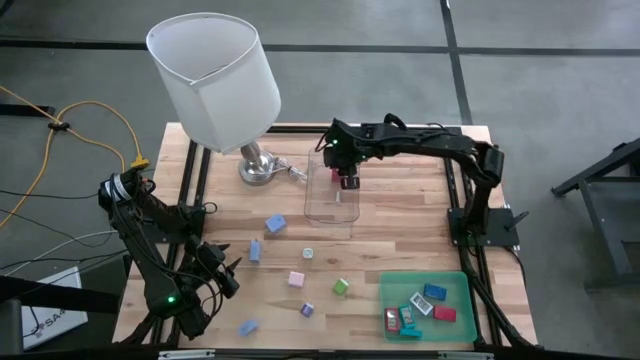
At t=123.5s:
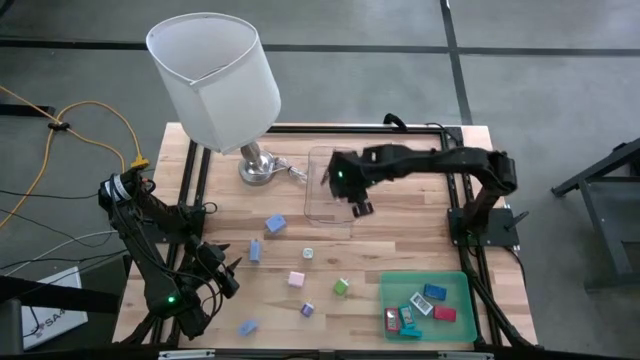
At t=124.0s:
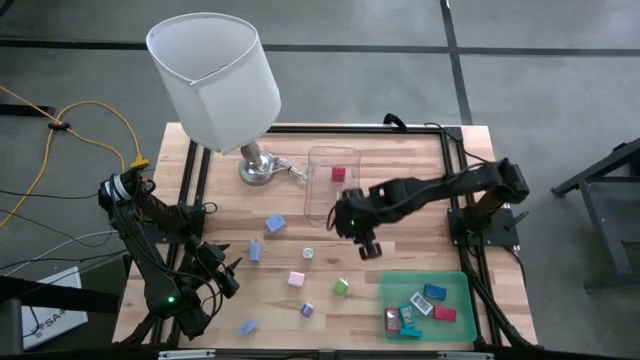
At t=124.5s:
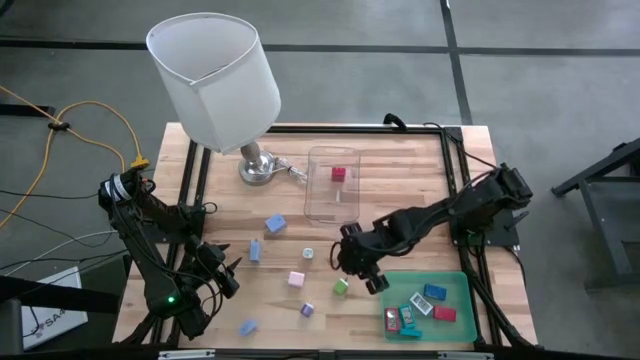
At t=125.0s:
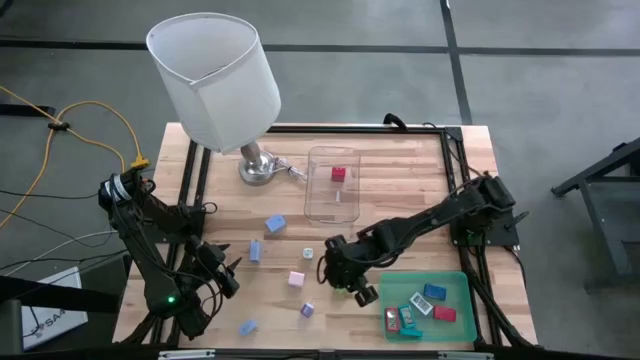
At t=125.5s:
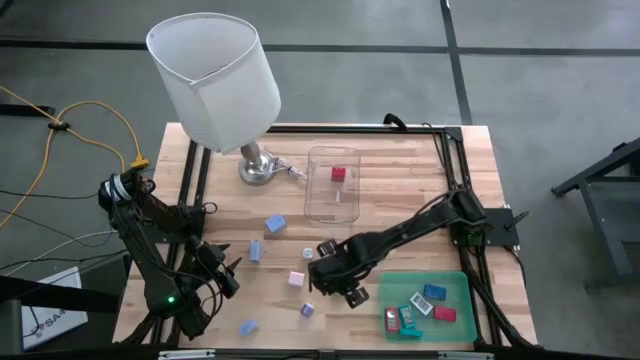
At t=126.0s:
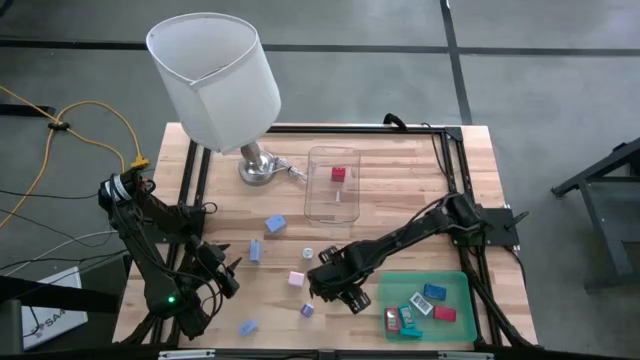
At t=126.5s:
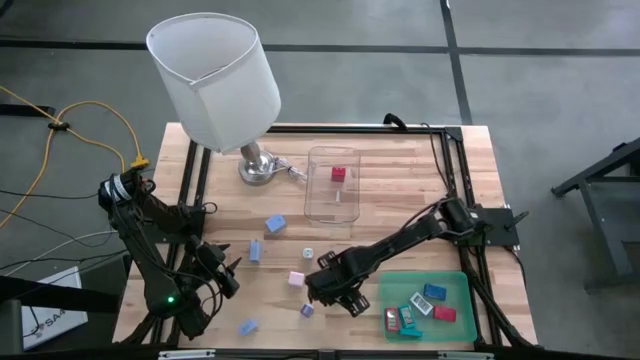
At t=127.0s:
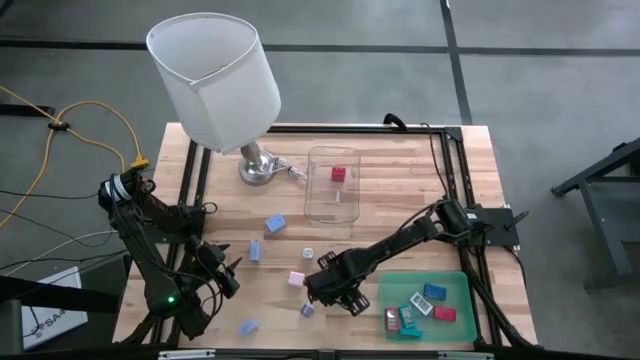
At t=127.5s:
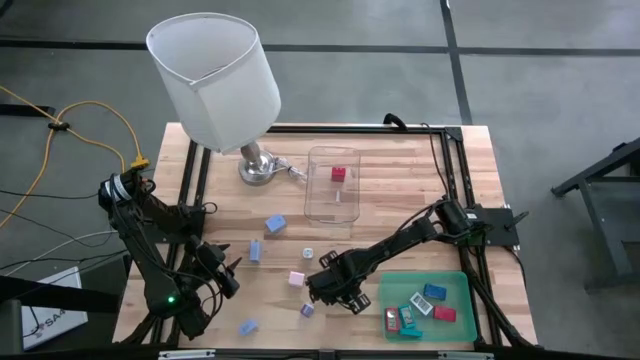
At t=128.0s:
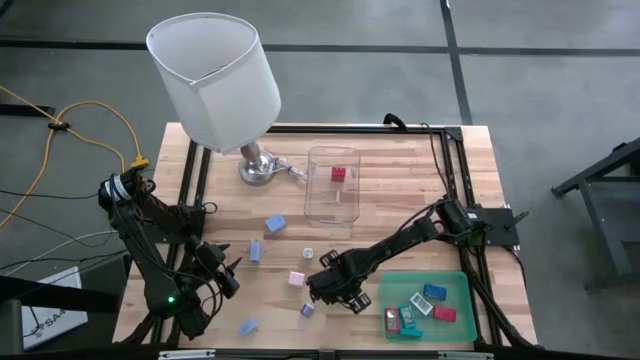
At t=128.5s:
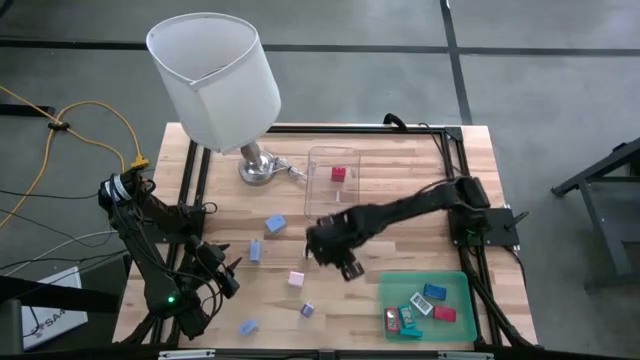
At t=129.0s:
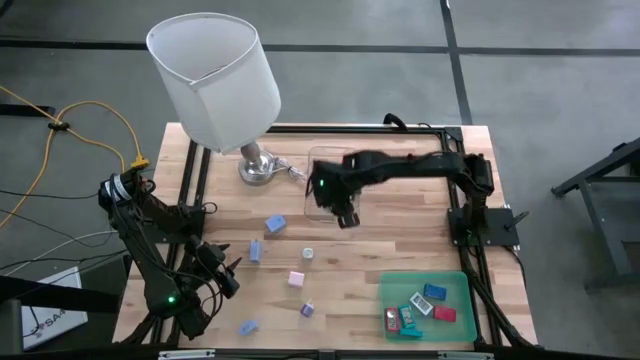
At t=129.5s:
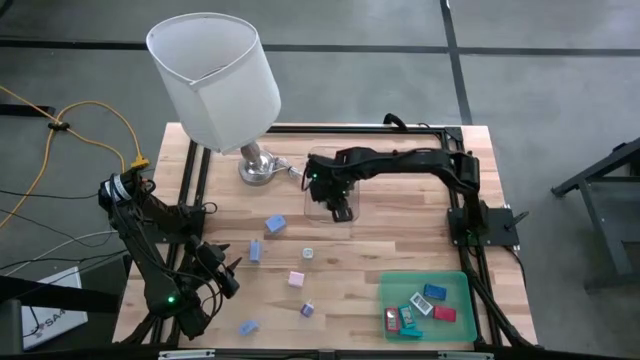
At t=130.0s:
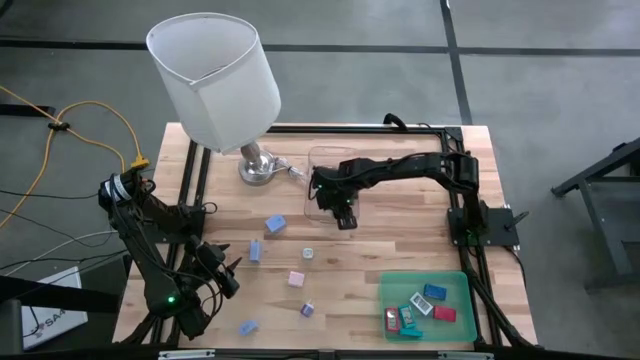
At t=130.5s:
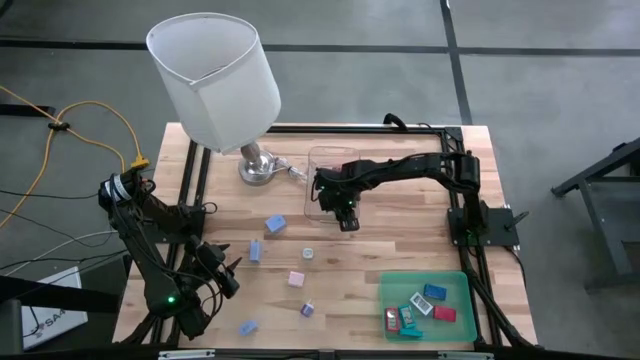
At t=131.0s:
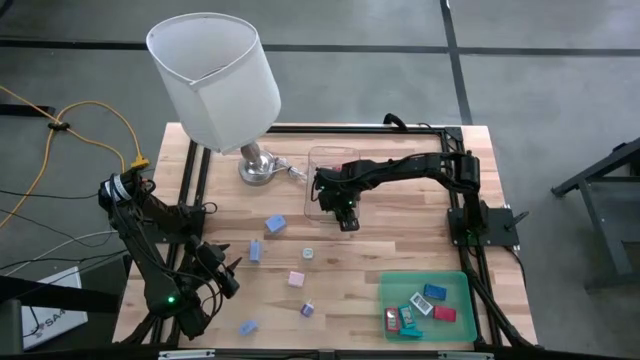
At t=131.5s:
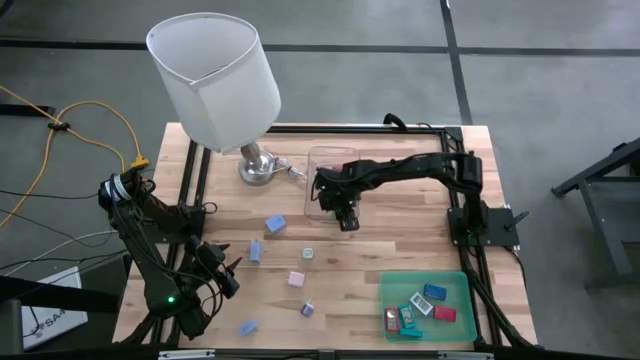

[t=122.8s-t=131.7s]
Task: Pick & Place Office items
Put the bottom green charger adapter into the transparent bin

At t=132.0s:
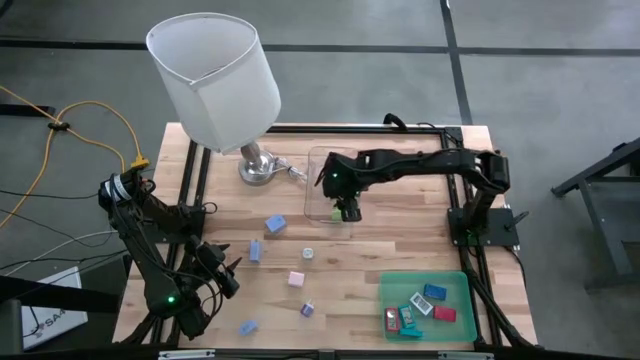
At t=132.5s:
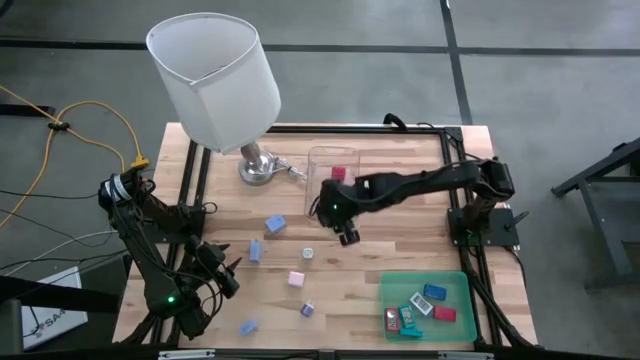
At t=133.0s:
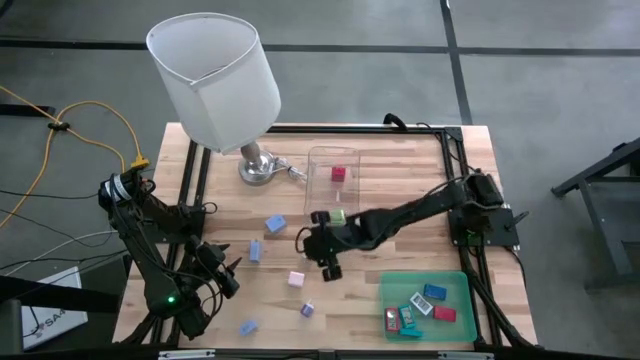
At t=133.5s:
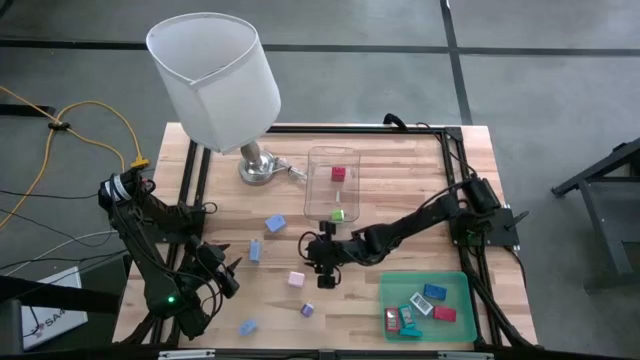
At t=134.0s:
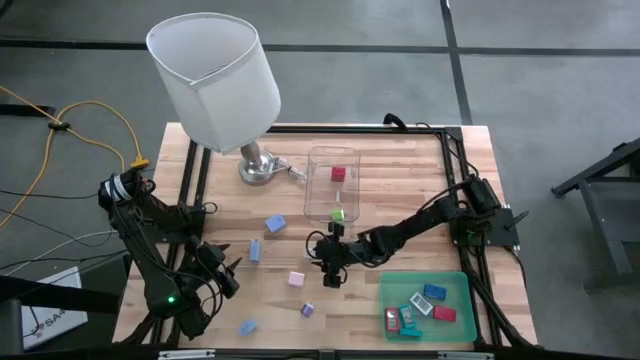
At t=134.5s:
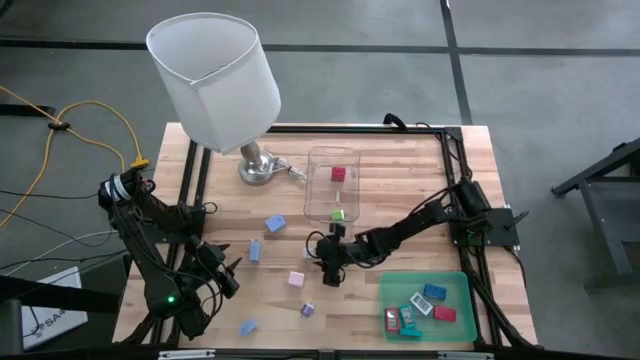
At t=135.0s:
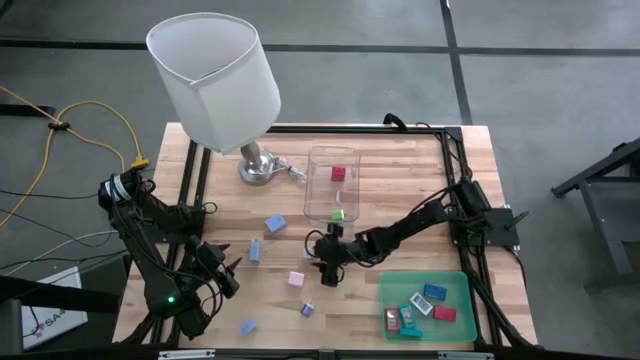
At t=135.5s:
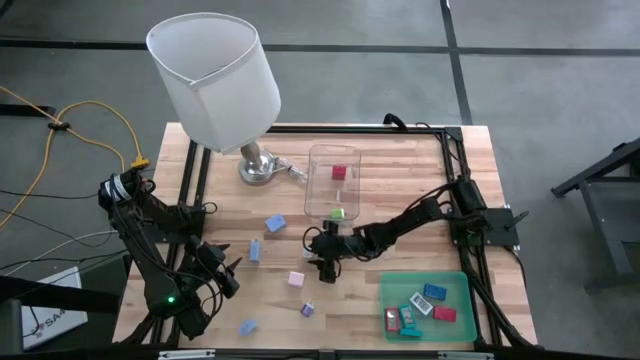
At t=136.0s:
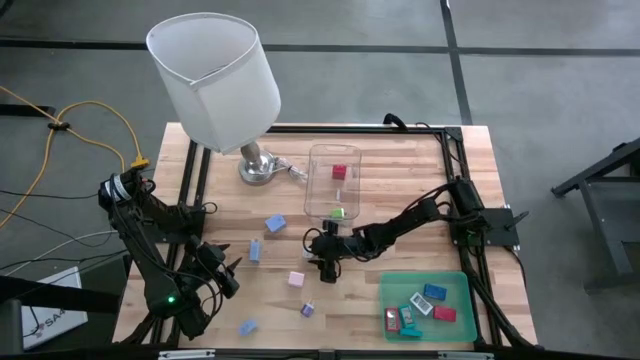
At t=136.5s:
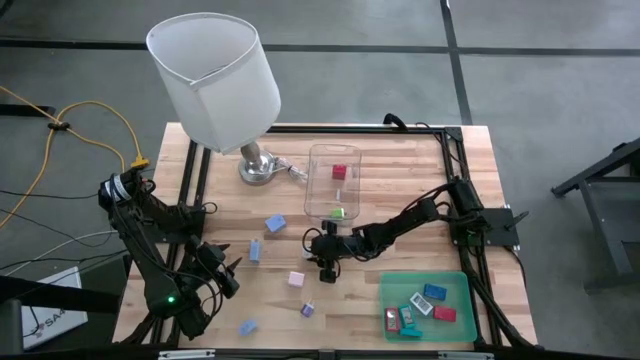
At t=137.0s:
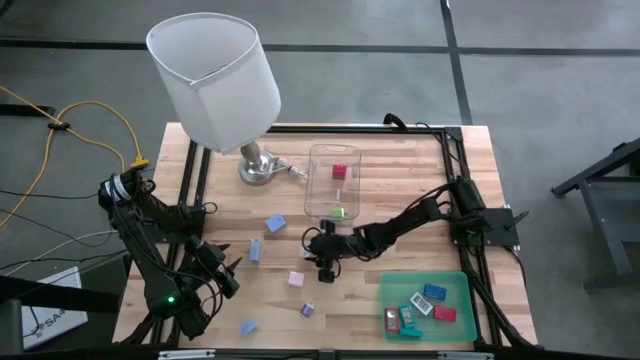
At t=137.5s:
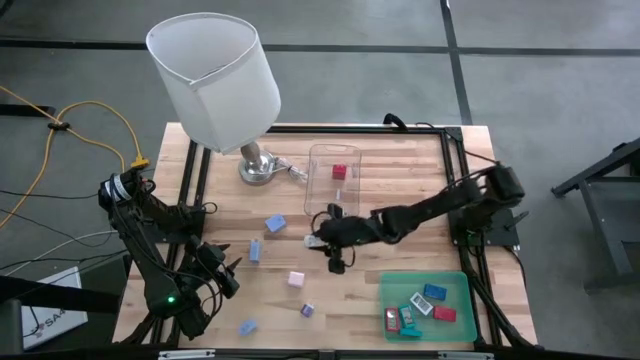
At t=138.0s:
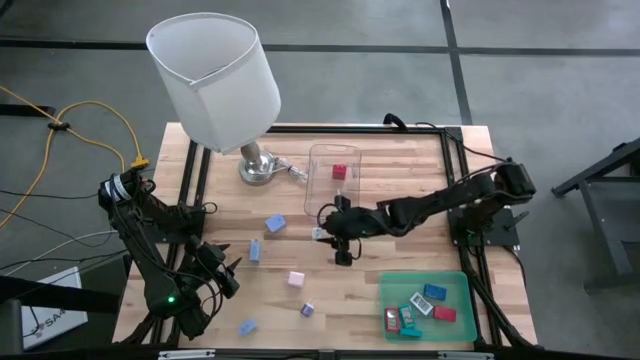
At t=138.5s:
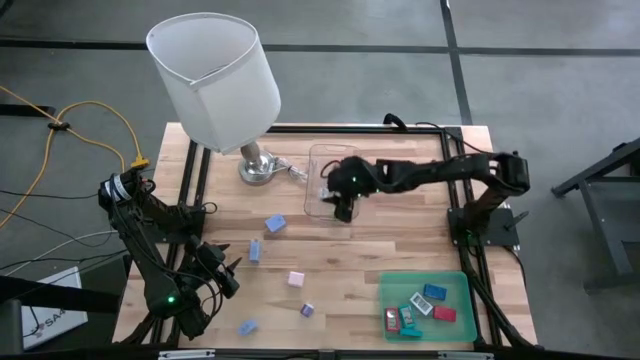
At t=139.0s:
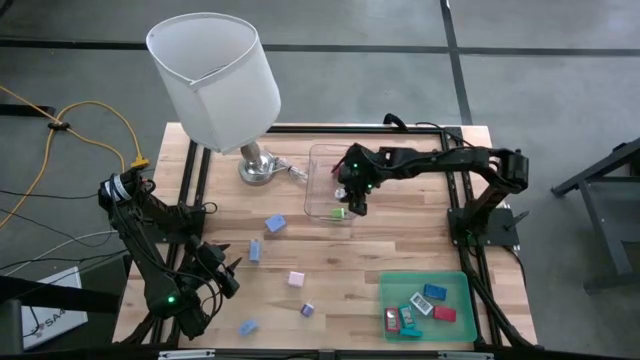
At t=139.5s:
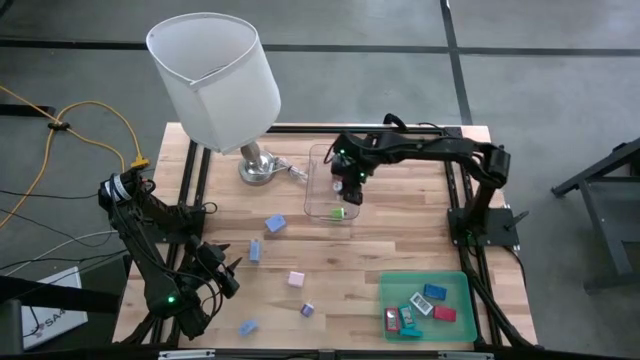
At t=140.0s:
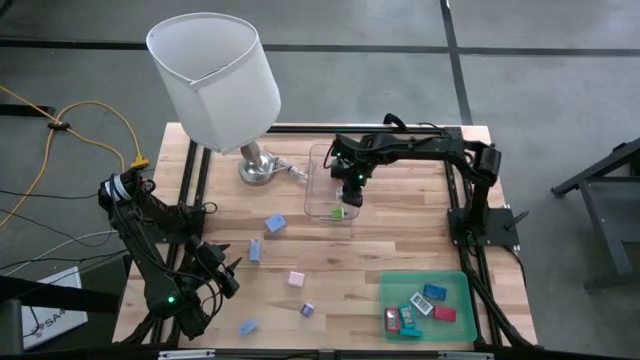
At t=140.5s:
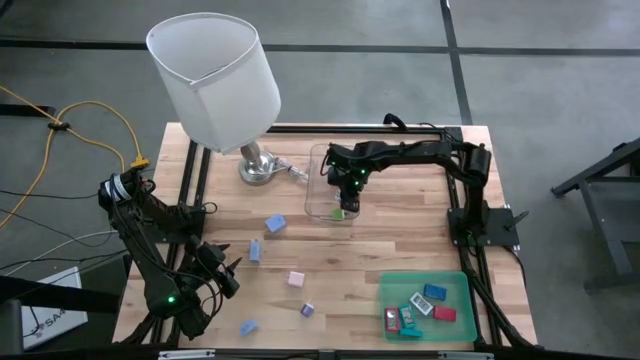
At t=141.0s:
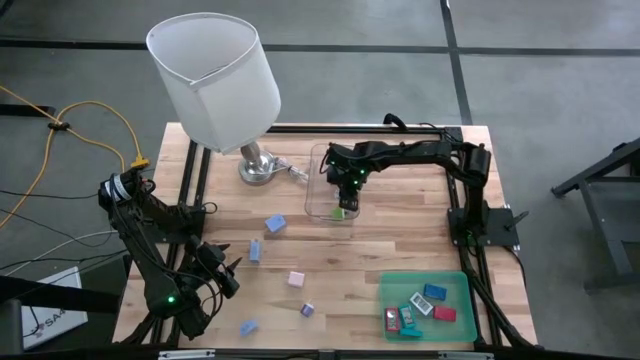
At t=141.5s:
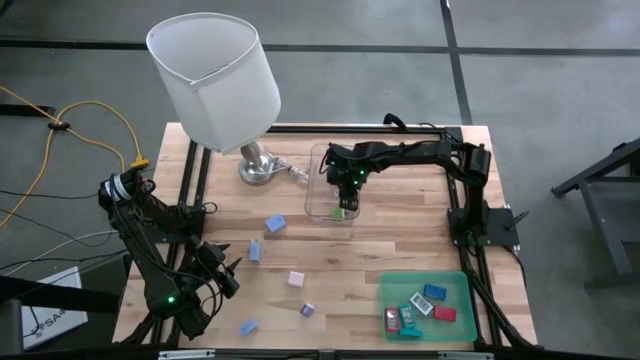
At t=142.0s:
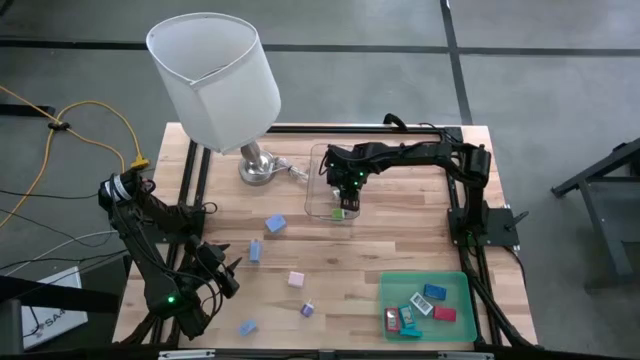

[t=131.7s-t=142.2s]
Put the green charger adapter into the transparent bin

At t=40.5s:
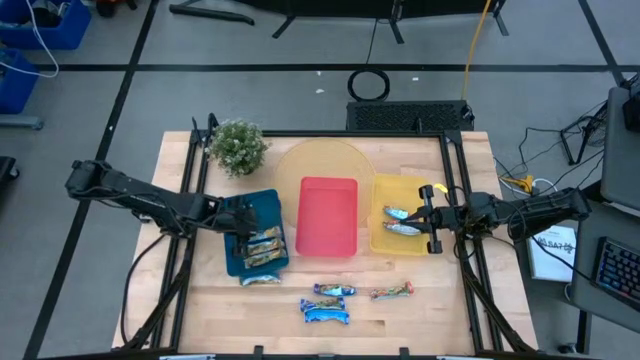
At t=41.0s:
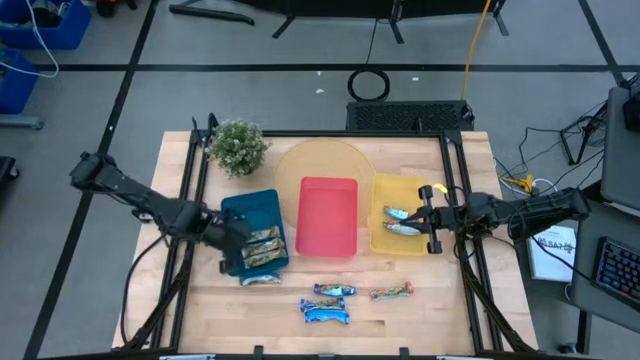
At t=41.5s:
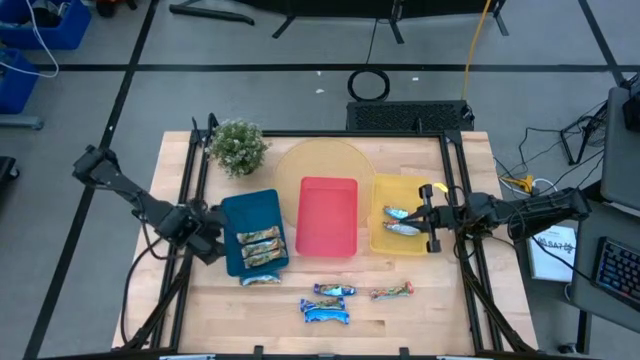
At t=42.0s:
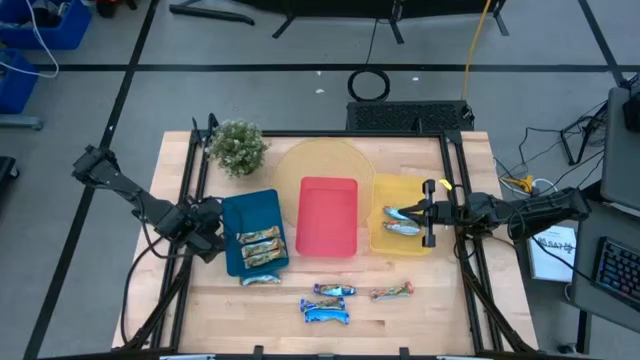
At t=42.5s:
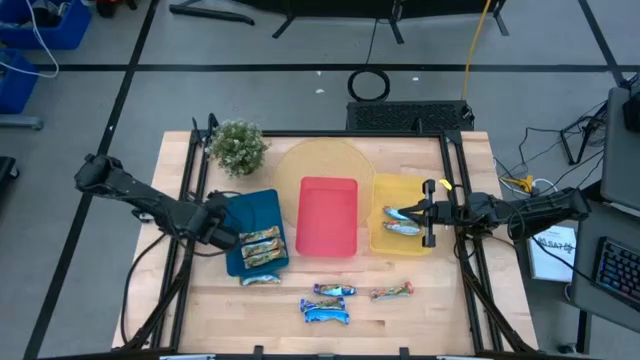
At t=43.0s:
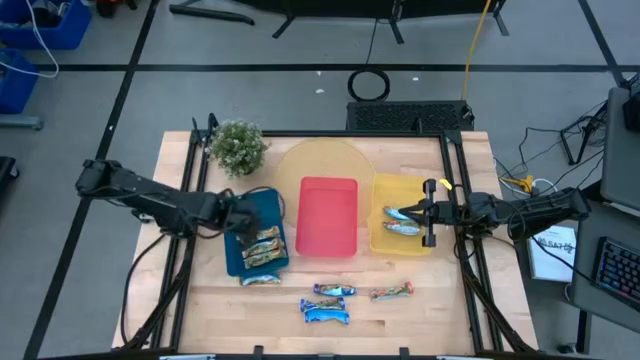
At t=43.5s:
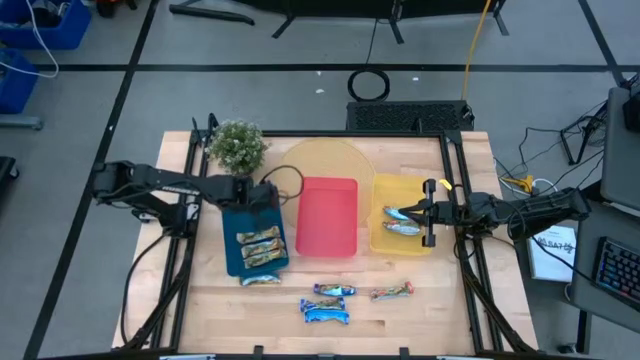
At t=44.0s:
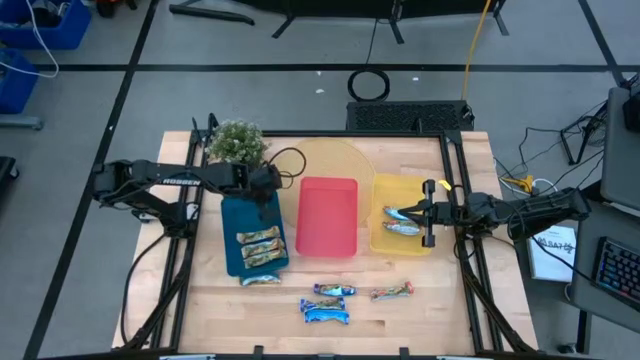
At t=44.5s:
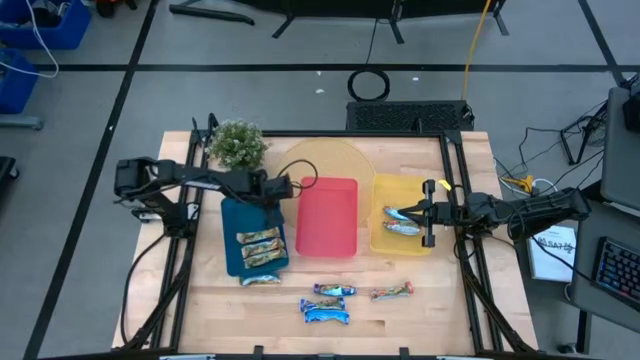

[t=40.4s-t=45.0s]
Task: Pick and place Granola Bars by type
Adjust the blue bin
